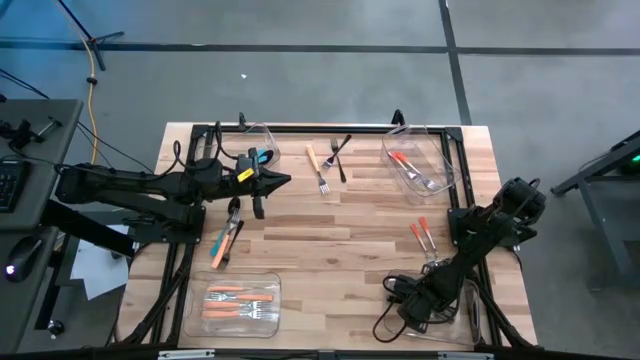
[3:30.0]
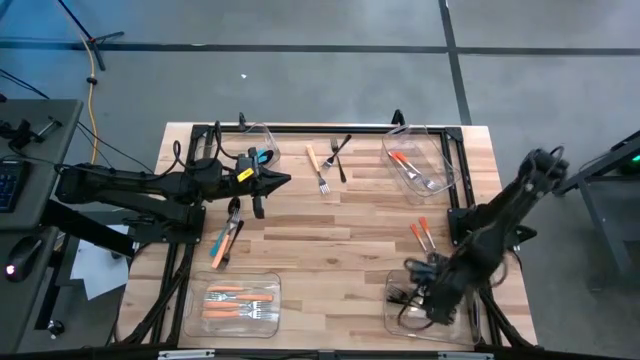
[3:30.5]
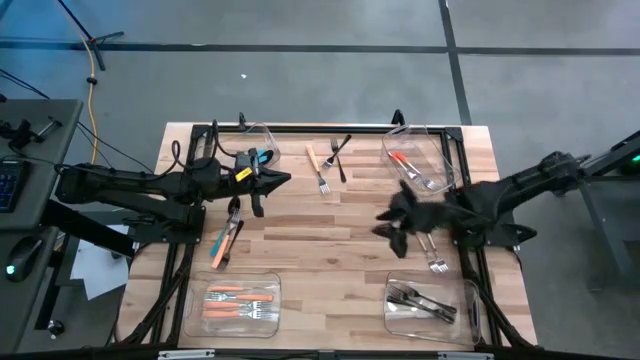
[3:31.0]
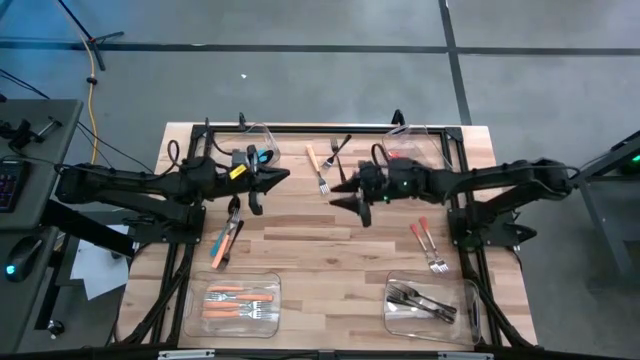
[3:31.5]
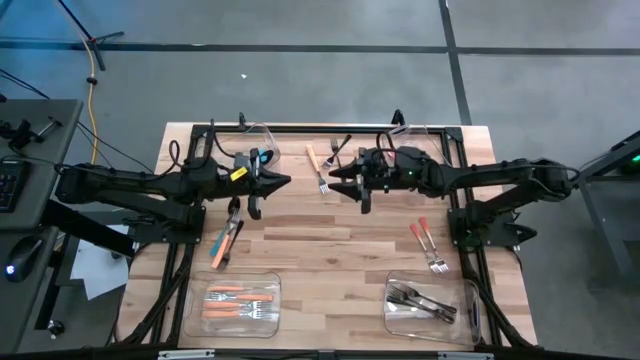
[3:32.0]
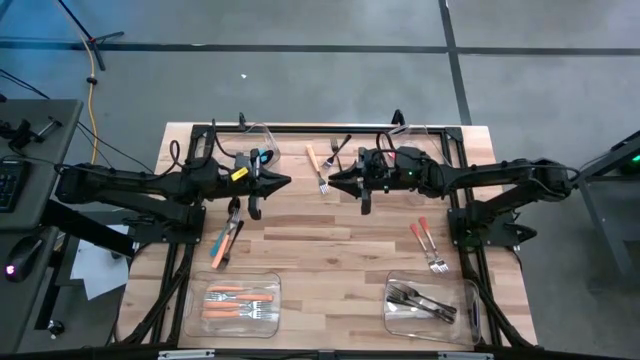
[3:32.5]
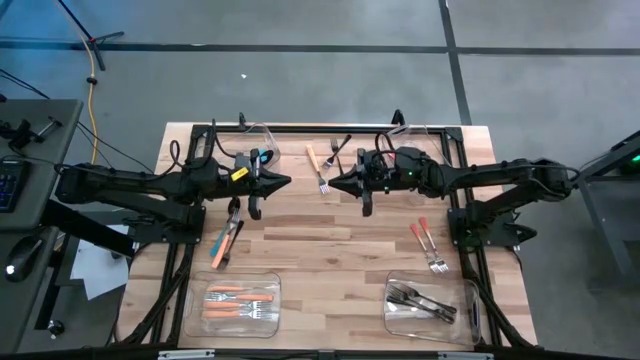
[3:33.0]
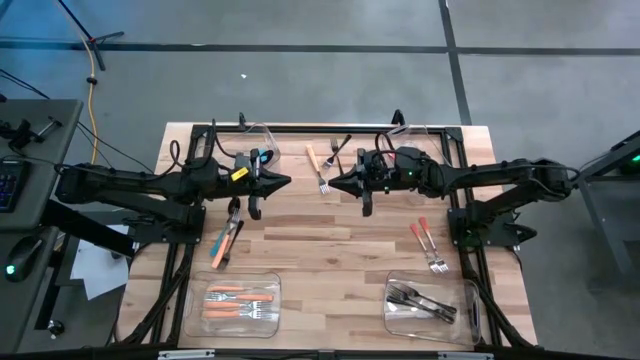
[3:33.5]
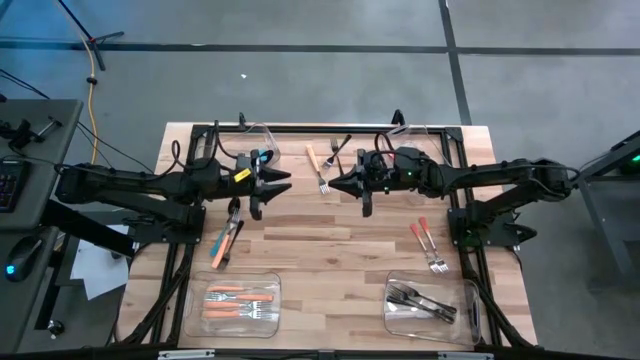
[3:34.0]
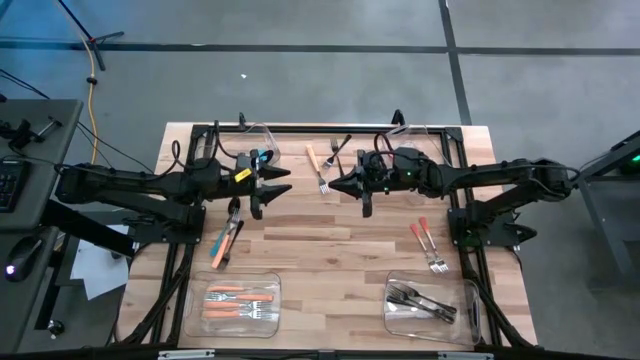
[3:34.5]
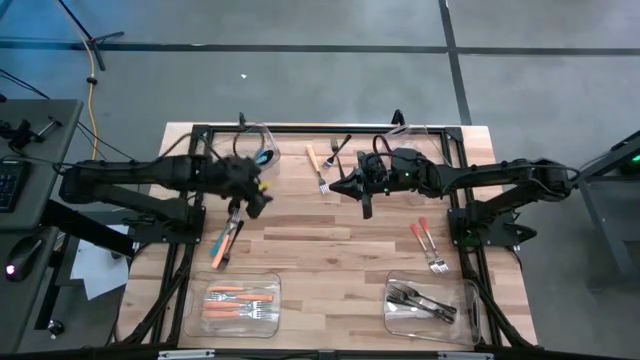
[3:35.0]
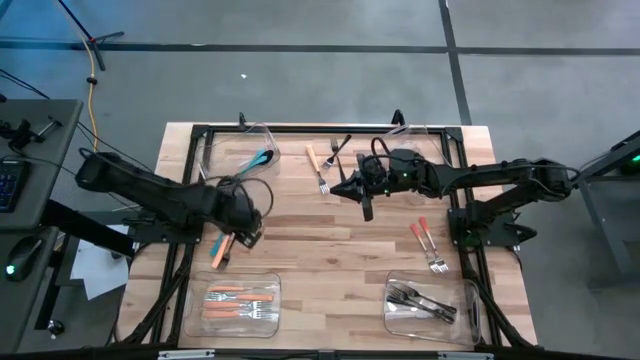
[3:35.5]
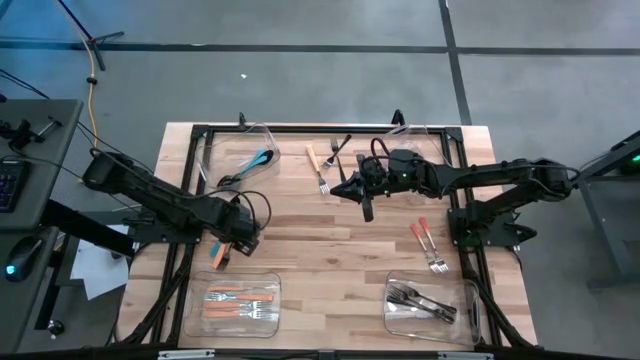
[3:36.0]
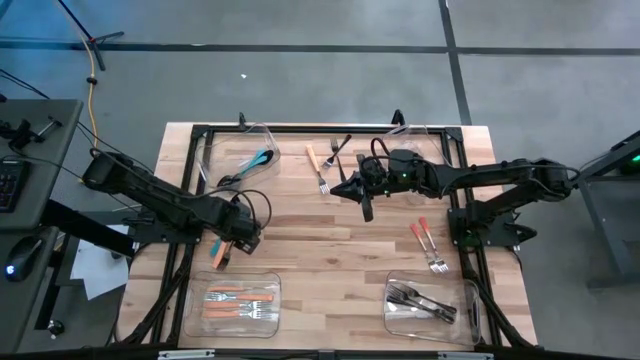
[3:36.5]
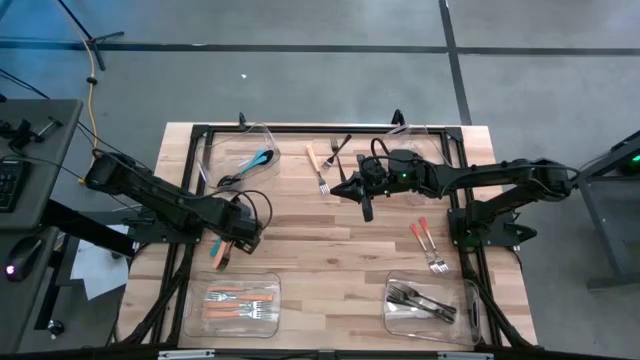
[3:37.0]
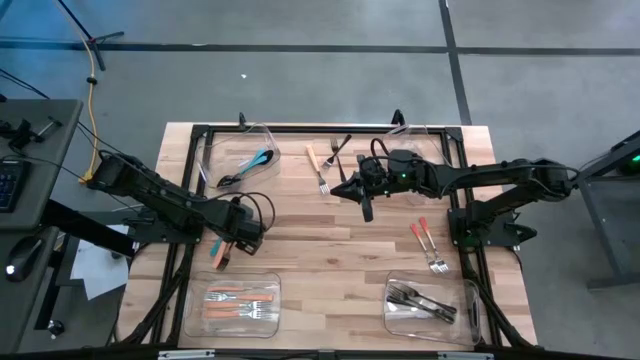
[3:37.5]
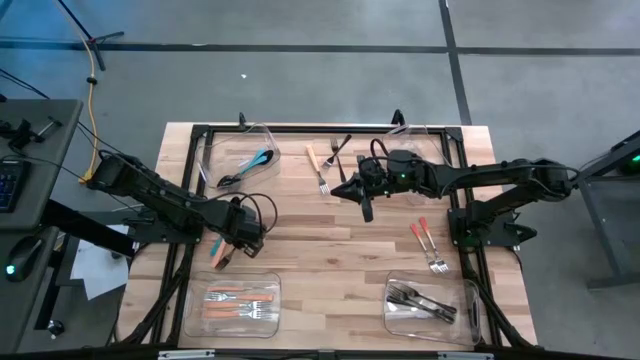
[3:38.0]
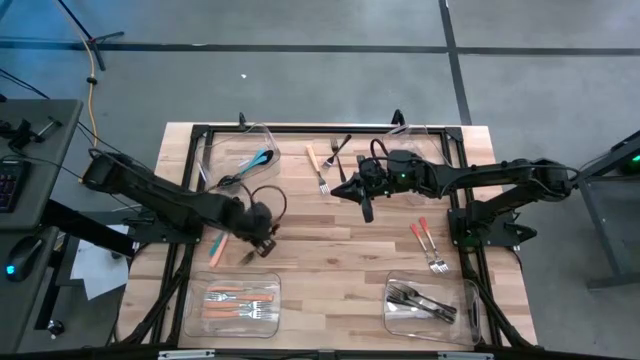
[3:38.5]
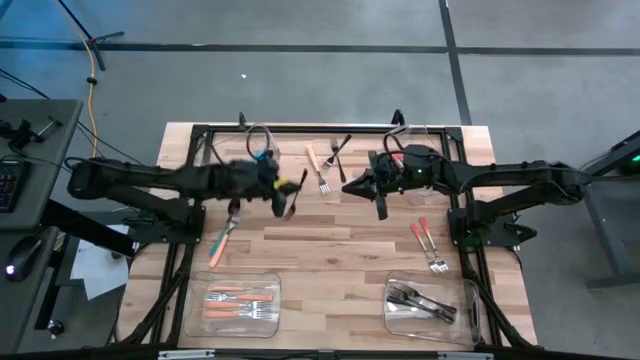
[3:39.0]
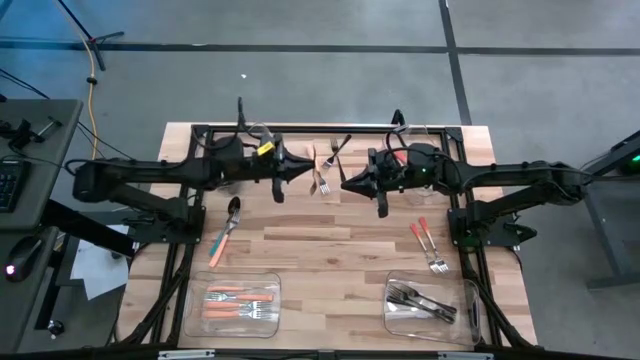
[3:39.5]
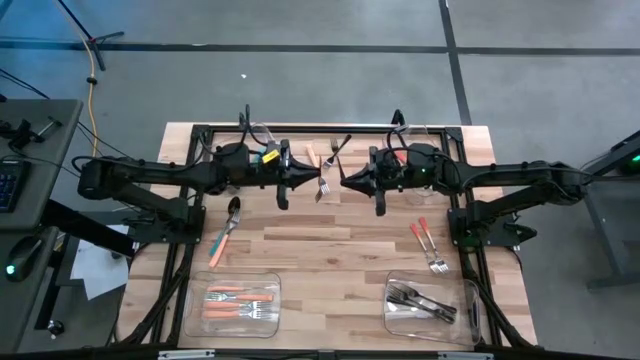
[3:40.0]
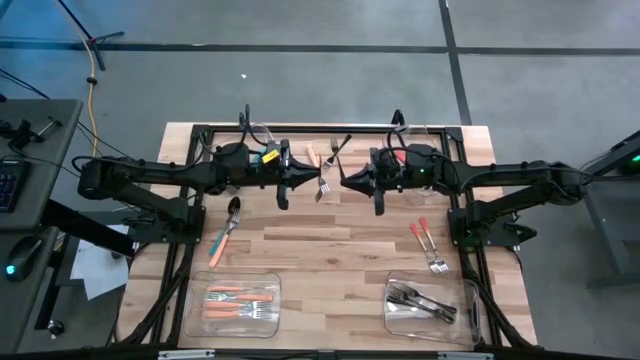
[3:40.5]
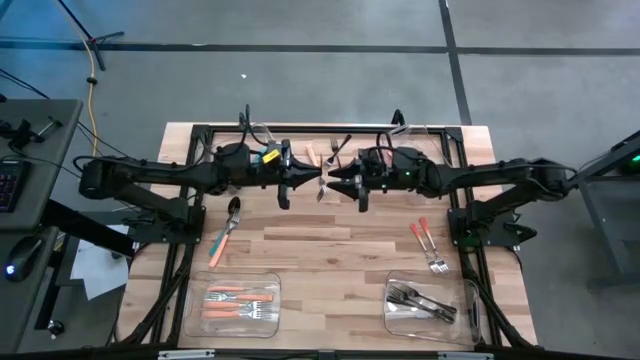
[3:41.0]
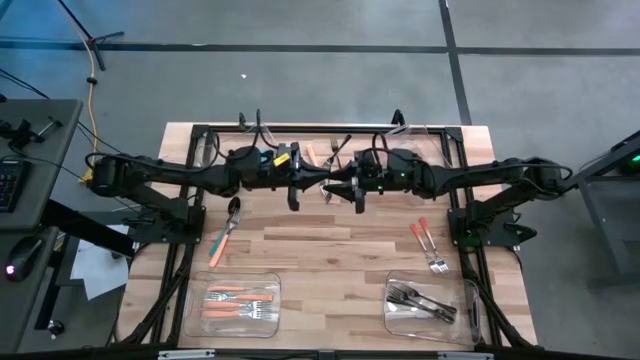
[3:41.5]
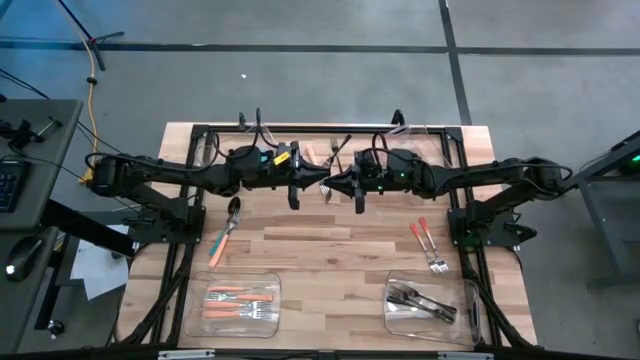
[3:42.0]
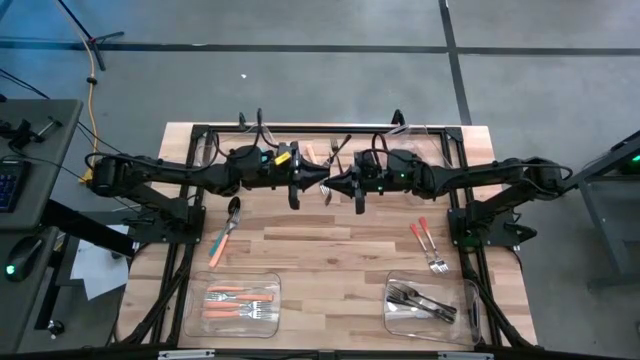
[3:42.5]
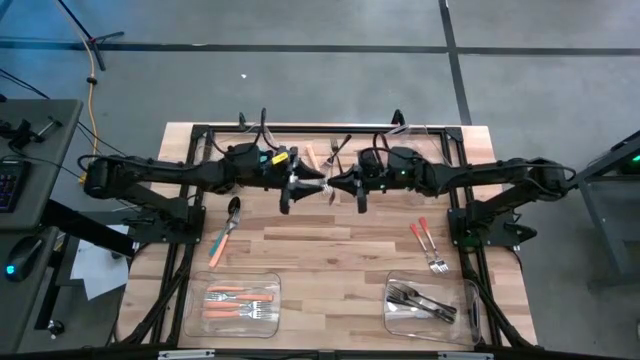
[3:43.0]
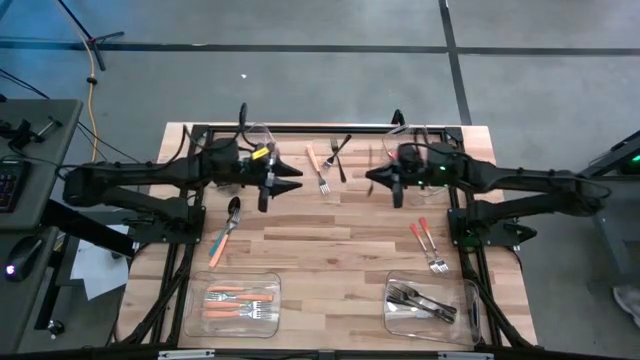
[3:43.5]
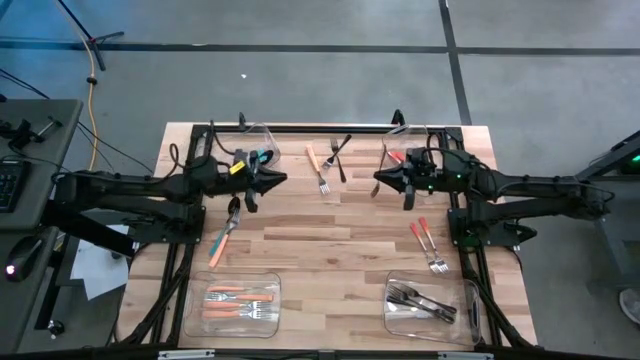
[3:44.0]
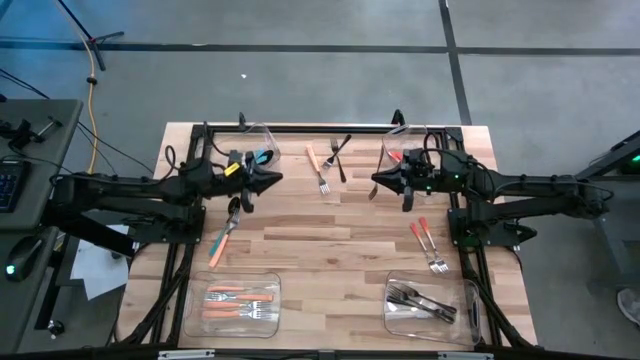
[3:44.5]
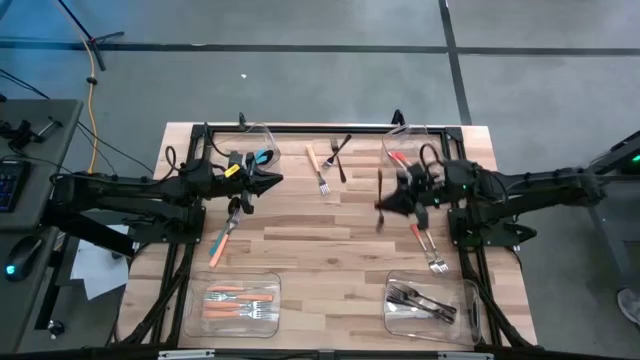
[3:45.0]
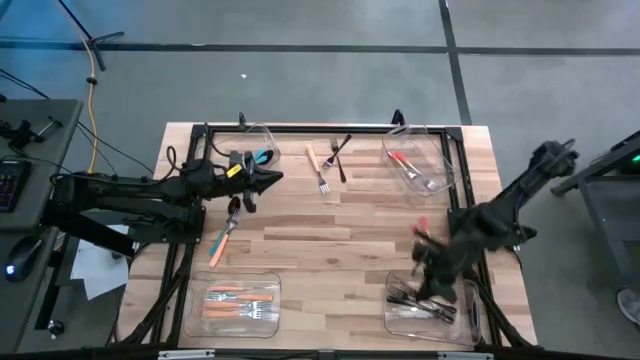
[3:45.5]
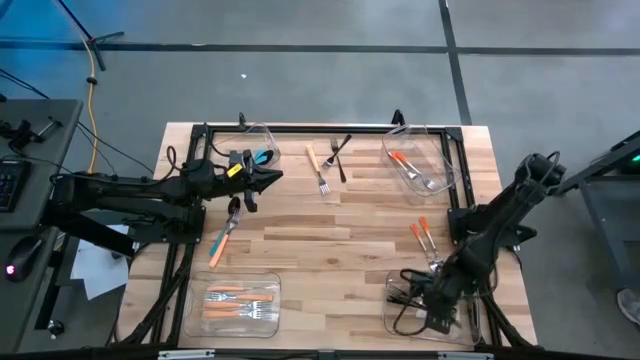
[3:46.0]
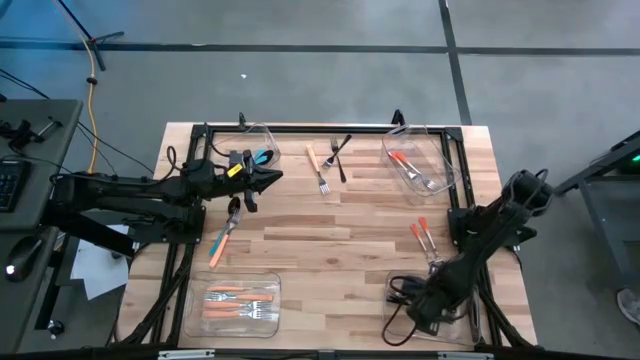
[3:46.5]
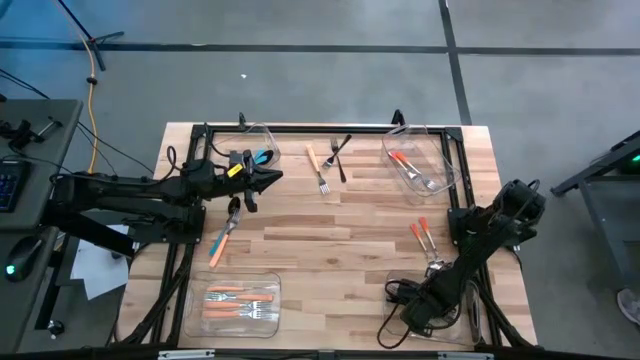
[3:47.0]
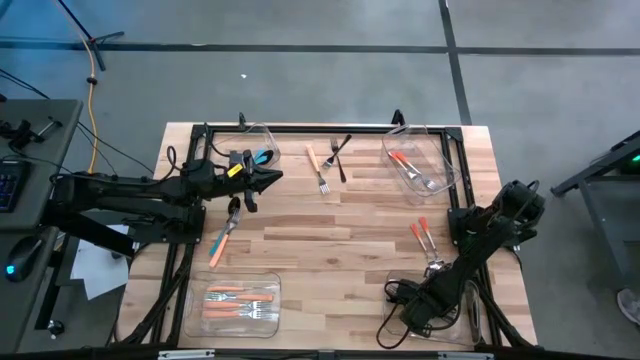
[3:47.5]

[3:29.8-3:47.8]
Task: Sort silverware by color (type)
Put the black fork into the bottom right transparent bin

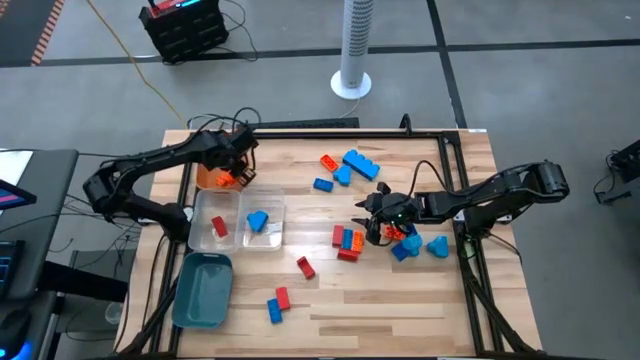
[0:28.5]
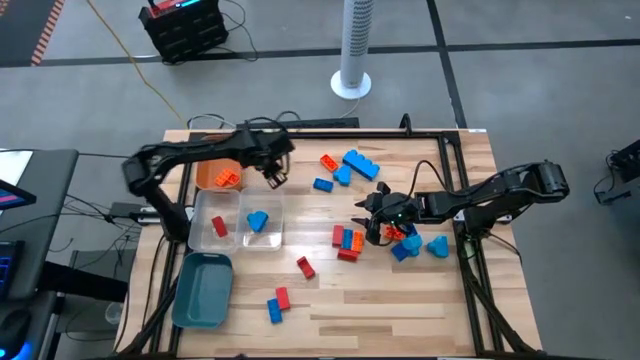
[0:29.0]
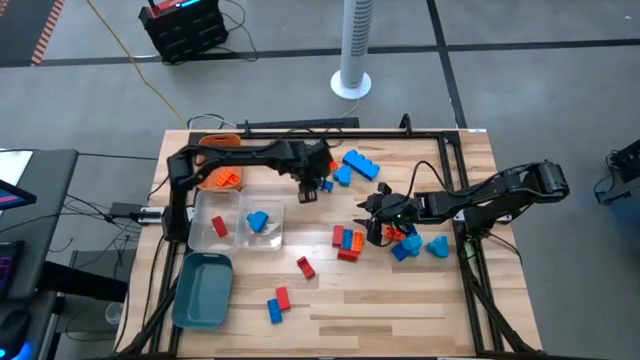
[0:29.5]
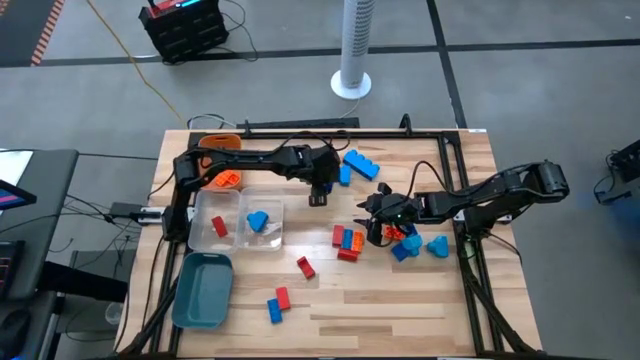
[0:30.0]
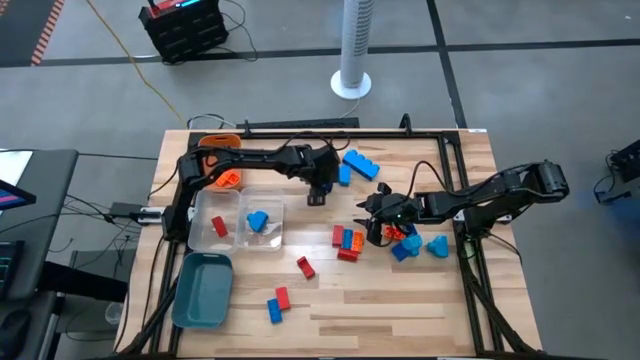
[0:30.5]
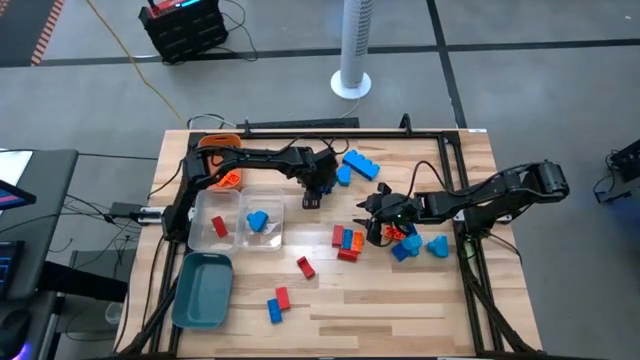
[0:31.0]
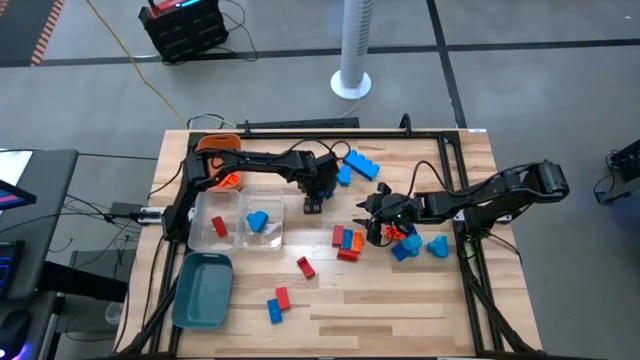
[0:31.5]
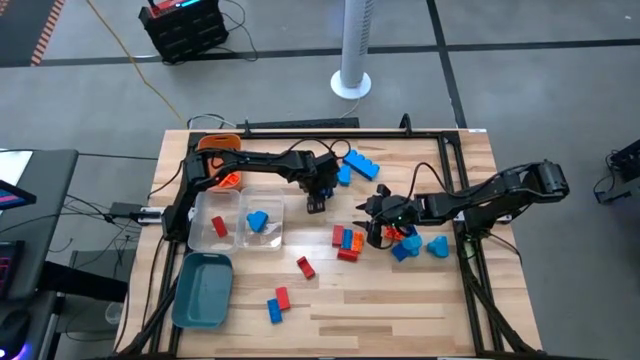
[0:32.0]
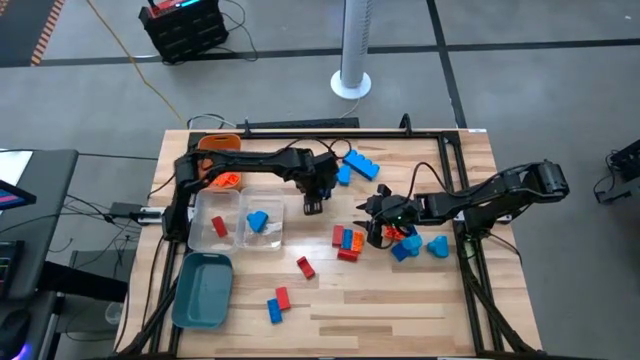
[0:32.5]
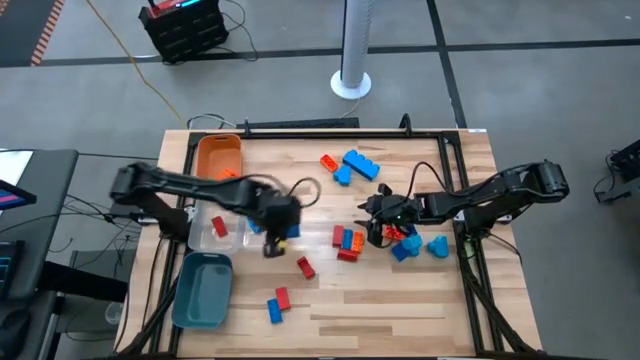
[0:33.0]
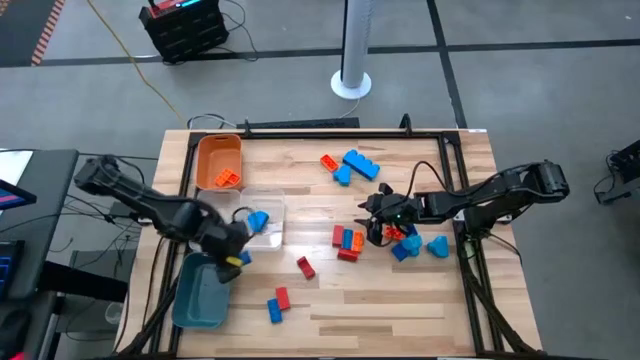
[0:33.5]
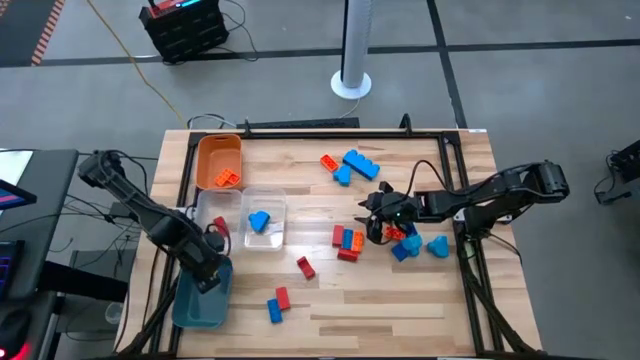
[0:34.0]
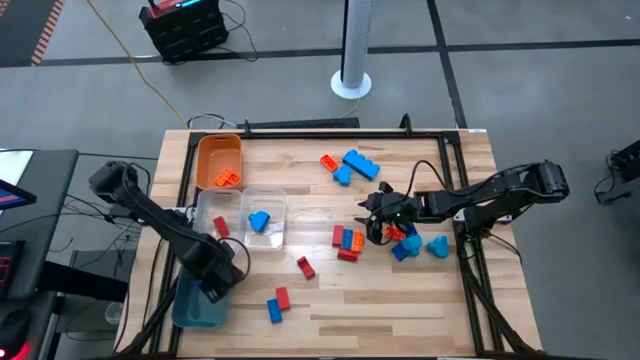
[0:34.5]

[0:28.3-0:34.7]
Task: Sort blocks
Put the blue game piece into the blue bin
